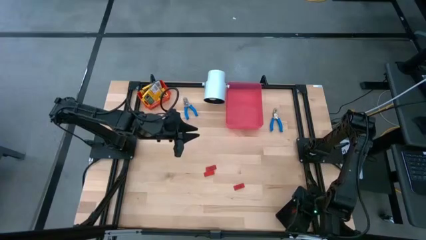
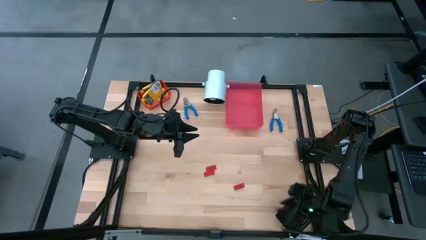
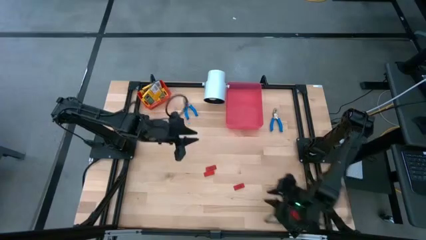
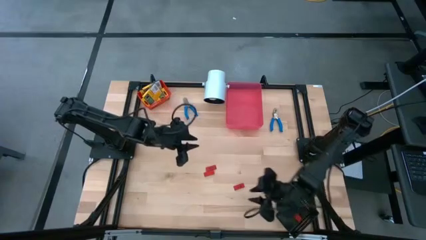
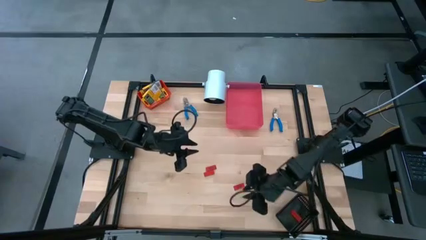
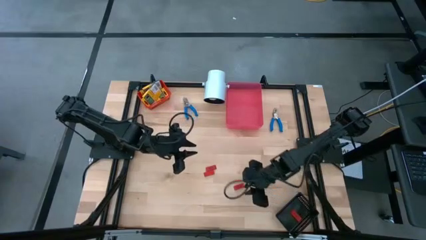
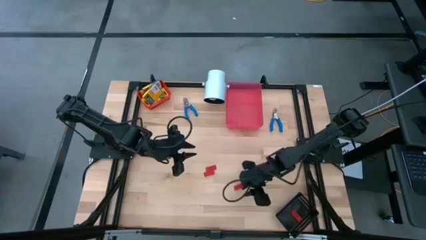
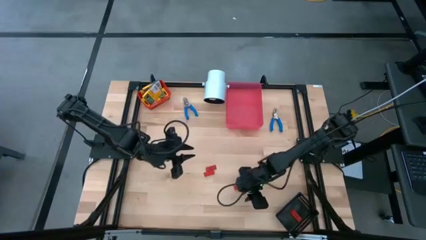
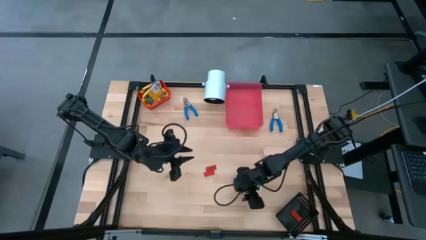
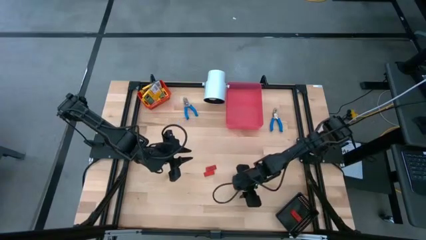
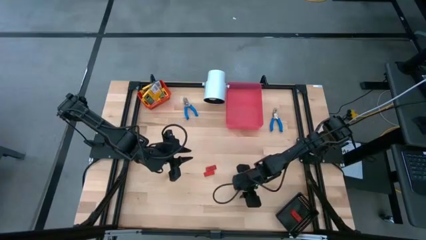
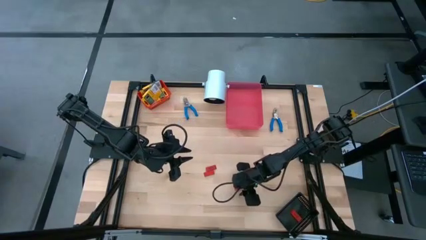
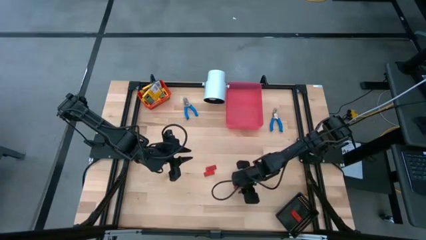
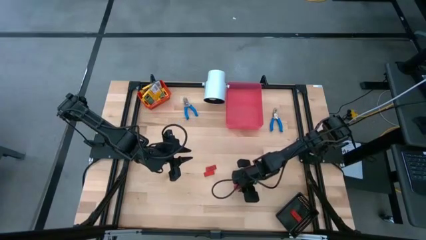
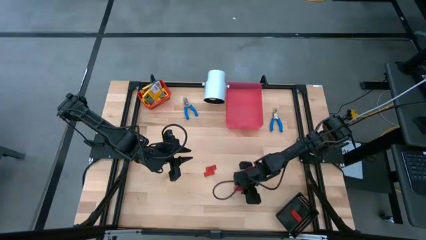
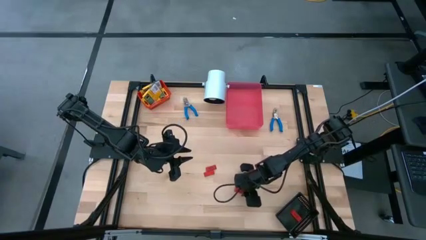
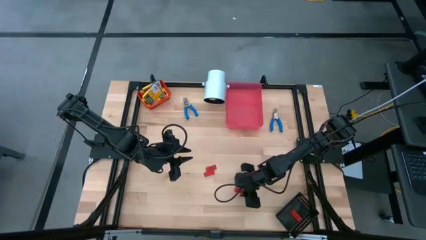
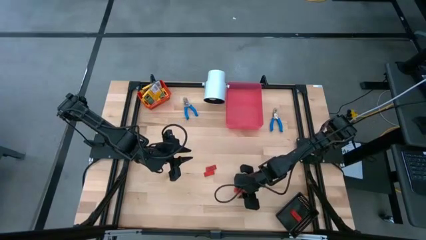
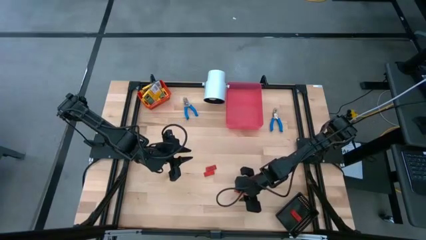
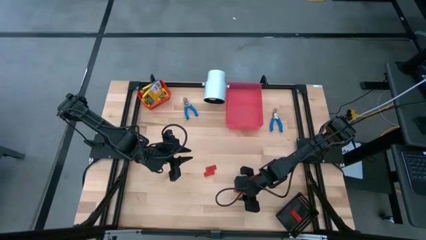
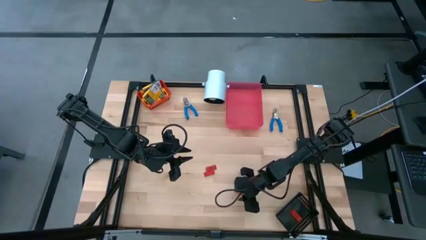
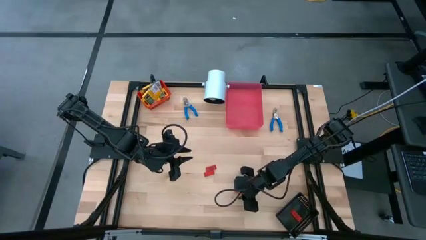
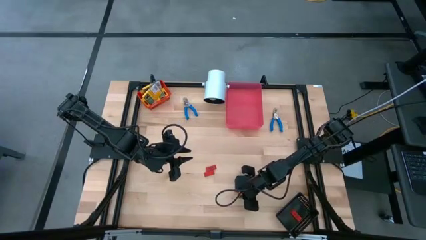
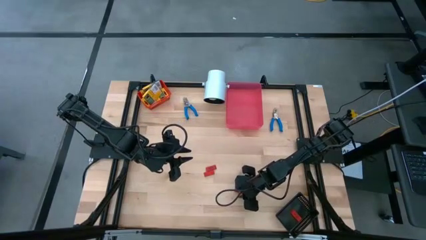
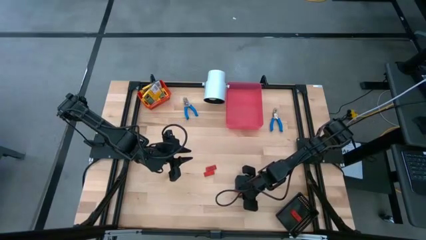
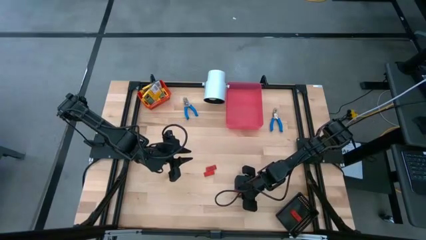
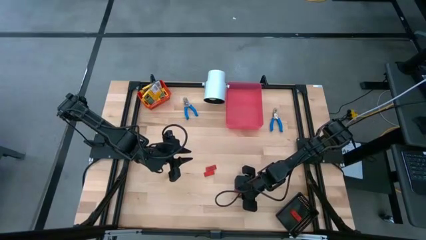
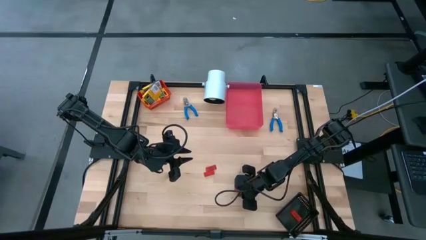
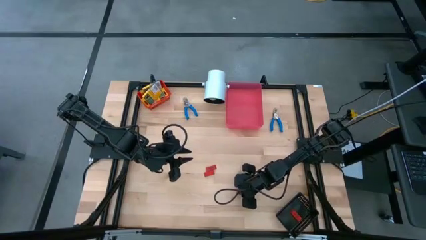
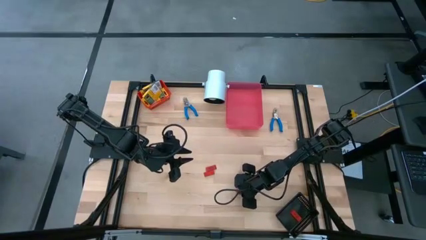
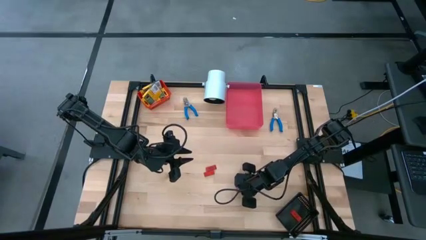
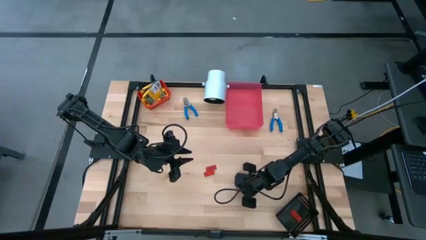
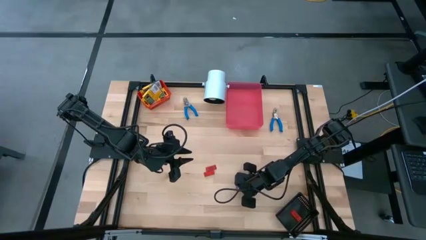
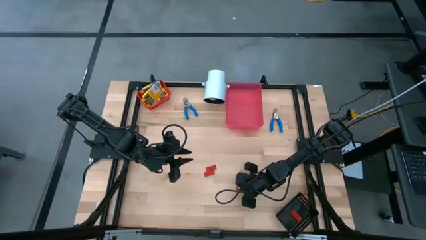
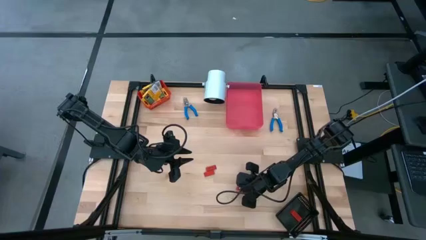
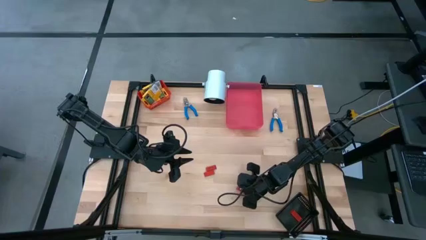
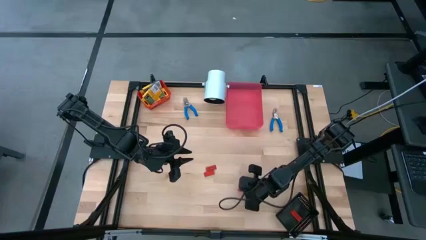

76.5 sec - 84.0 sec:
Task: Pick & Place School Supplies
Put the red eraser into the black bin

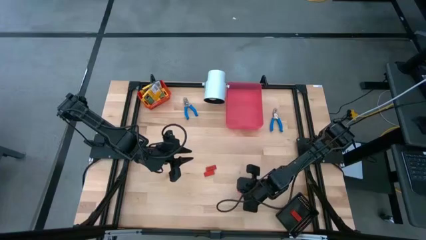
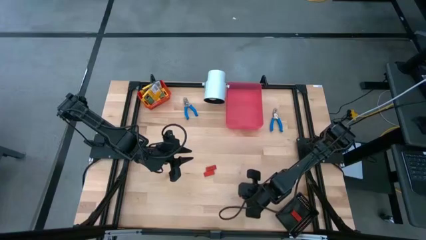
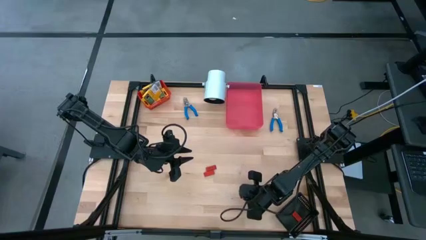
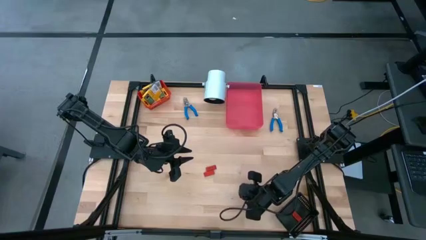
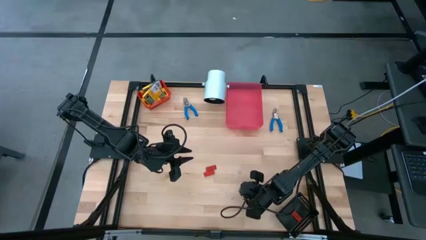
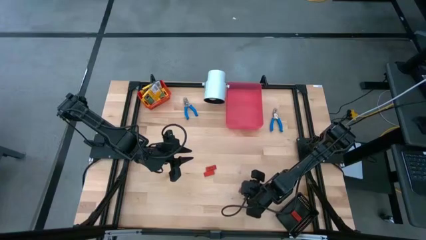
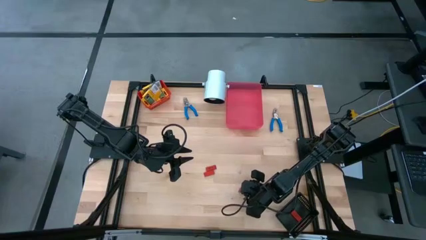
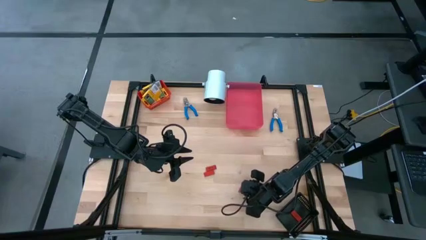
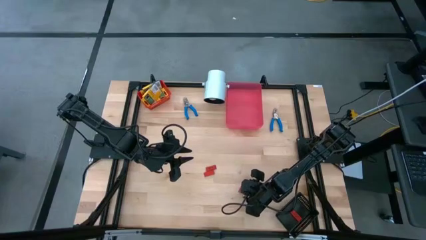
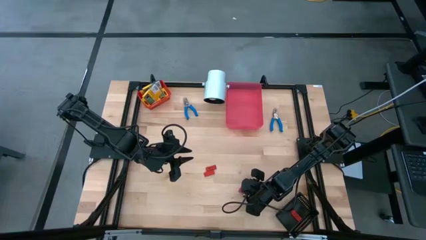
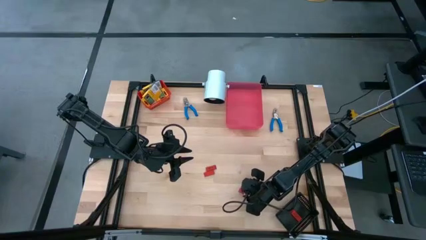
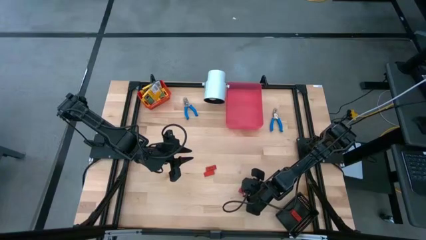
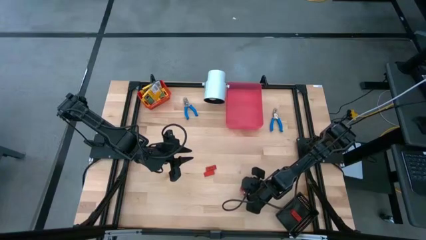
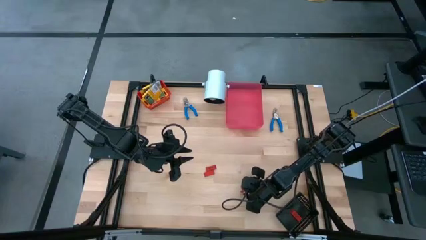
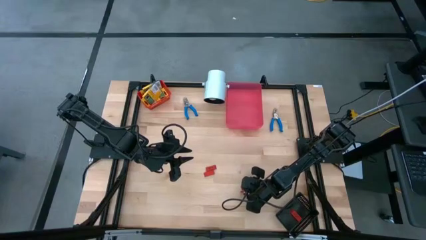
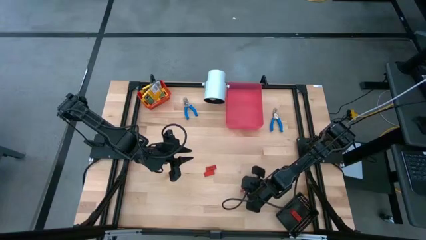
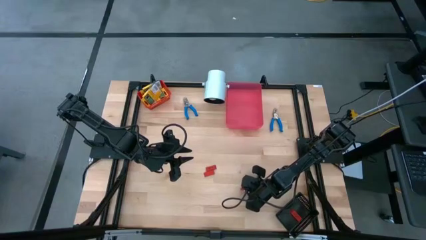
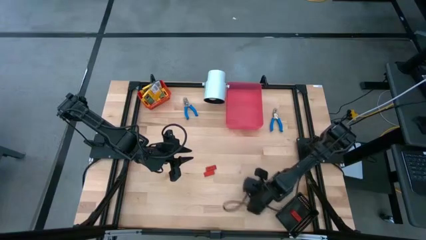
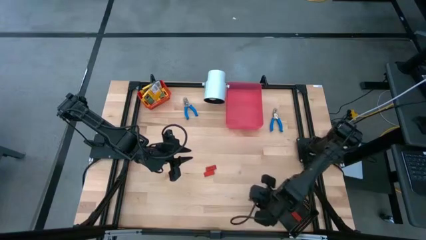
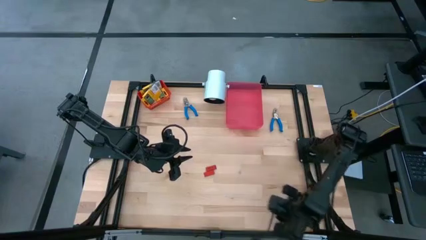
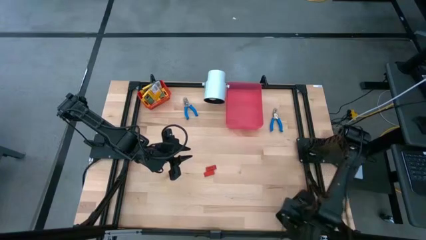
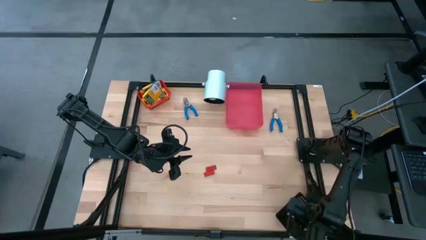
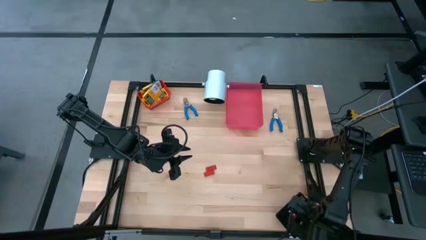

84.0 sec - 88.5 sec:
Put the red eraser into the black bin

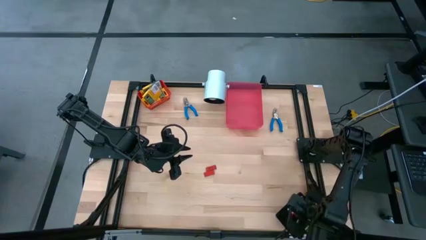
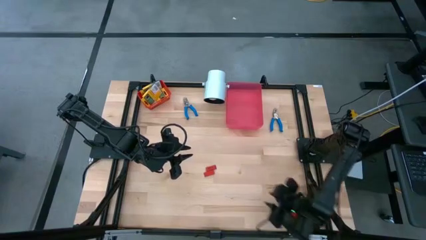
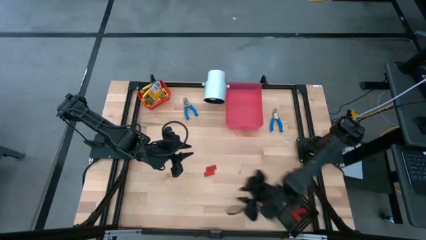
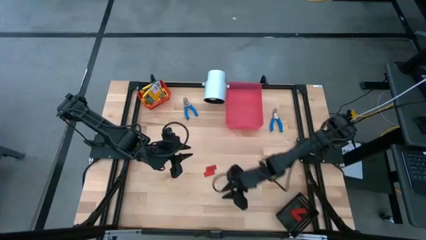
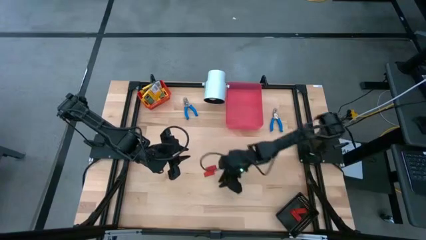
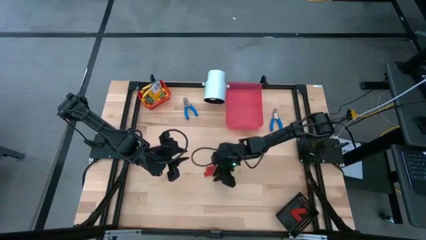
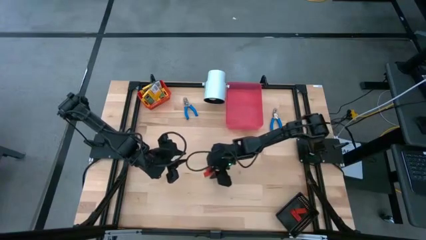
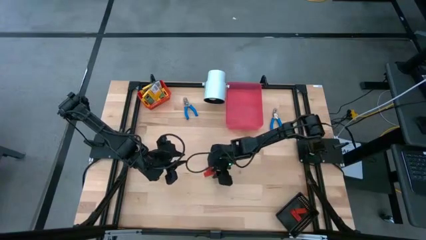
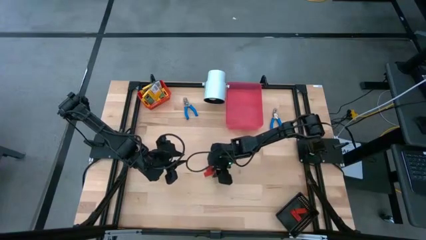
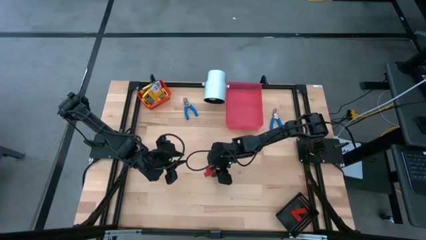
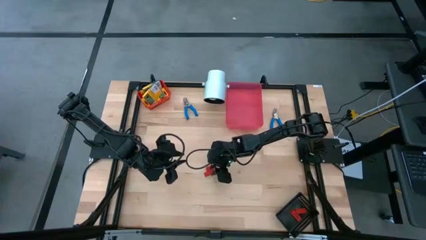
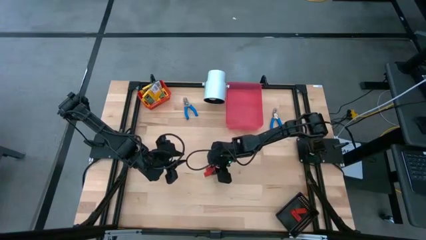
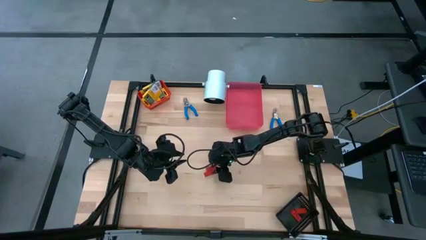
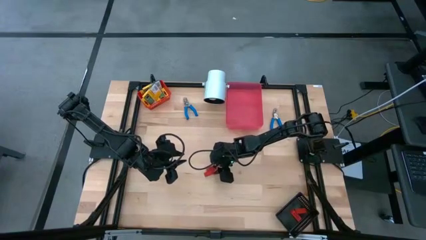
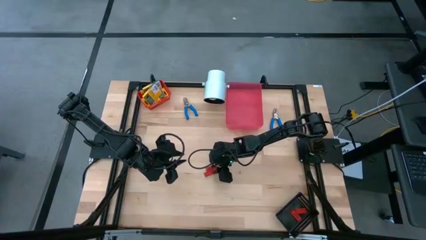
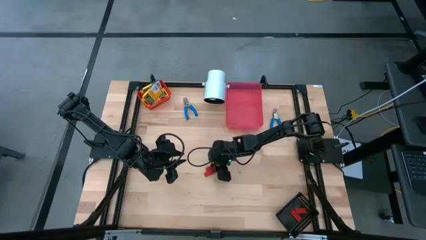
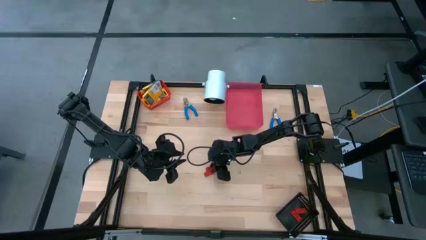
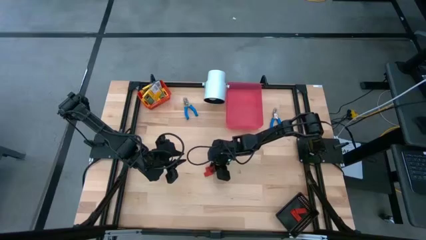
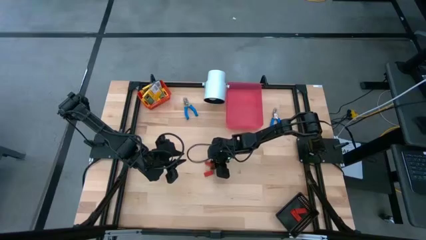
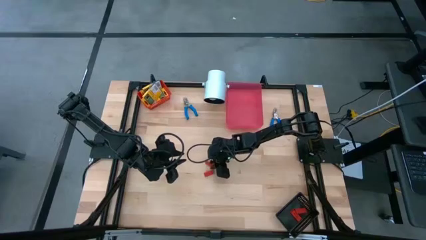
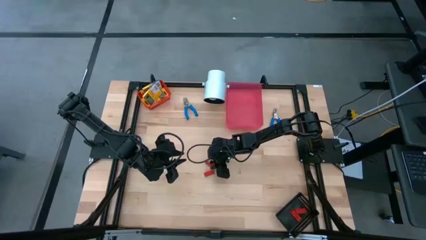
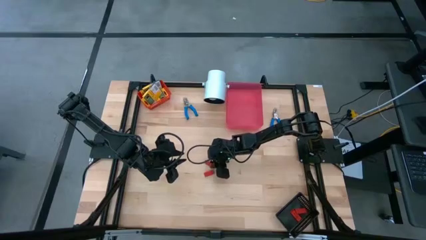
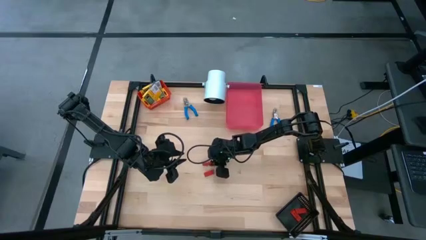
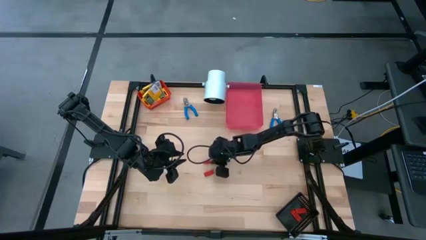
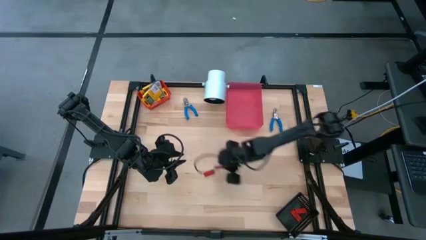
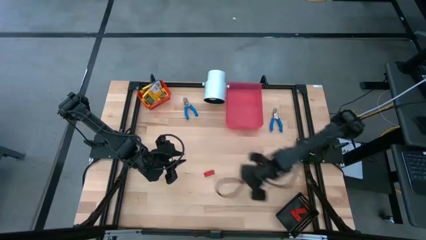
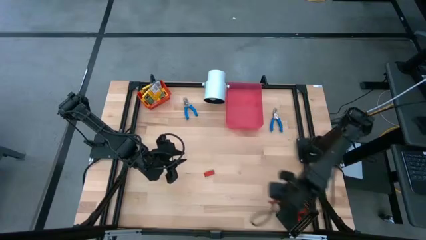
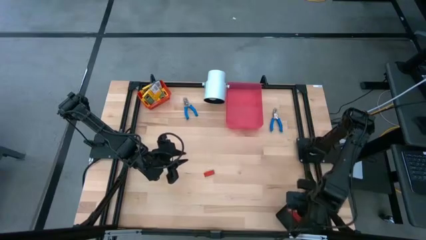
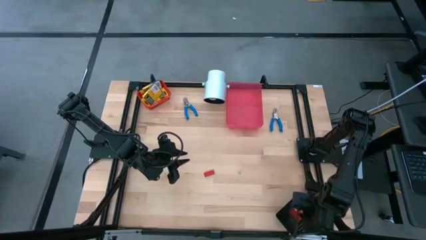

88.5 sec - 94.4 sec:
Put the red eraser into the black bin
